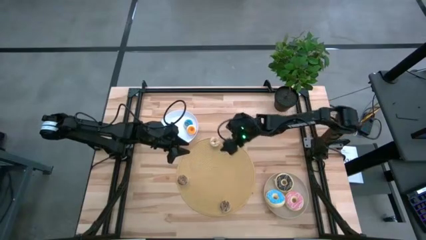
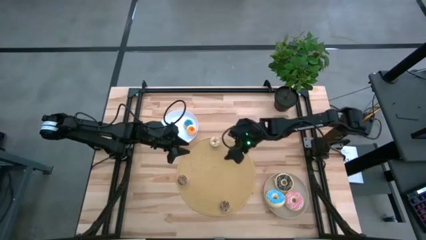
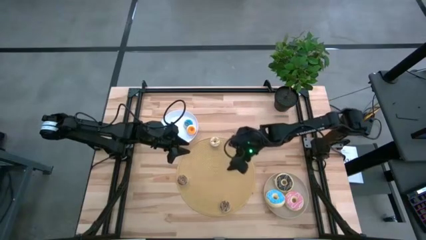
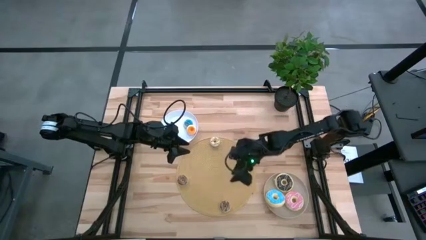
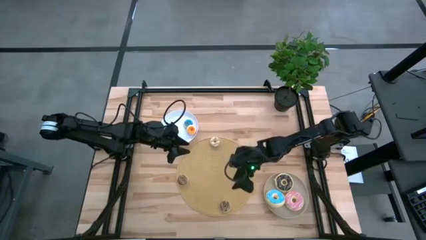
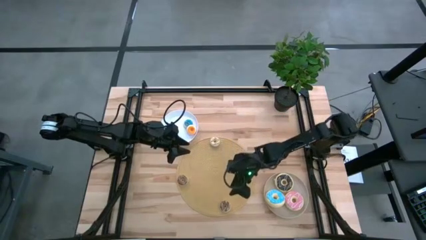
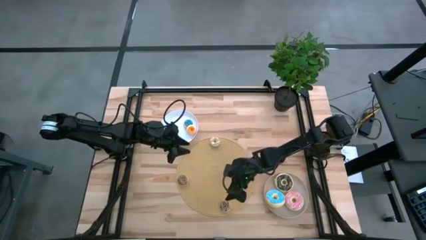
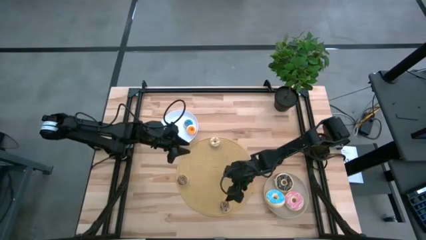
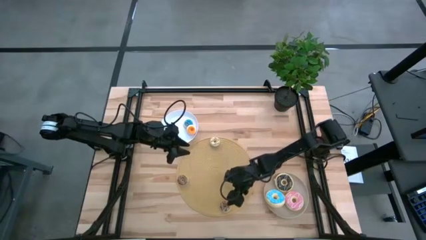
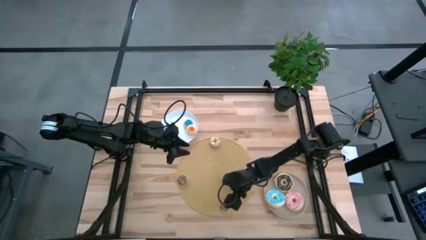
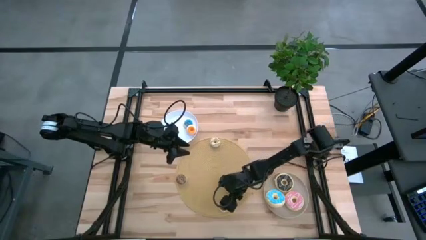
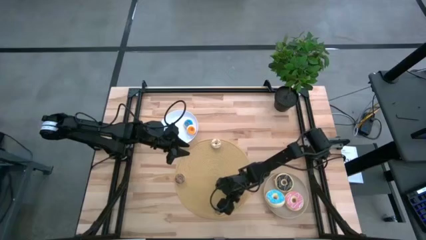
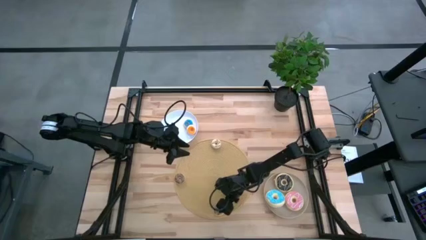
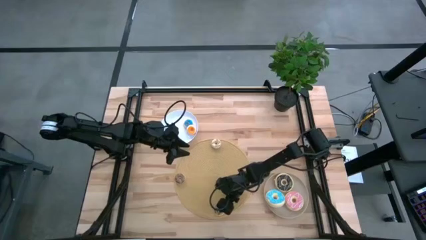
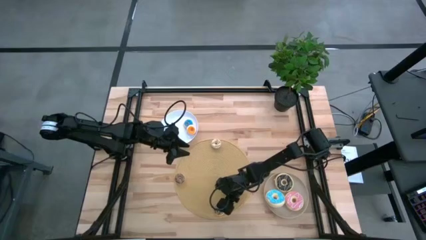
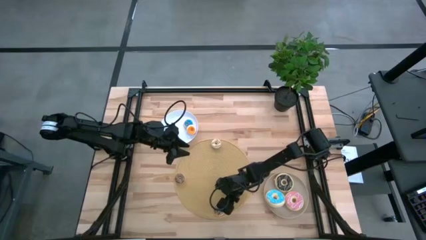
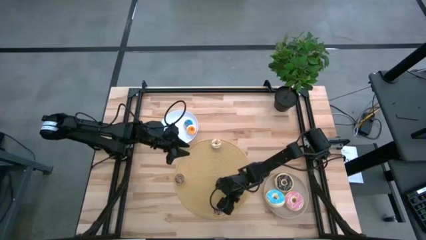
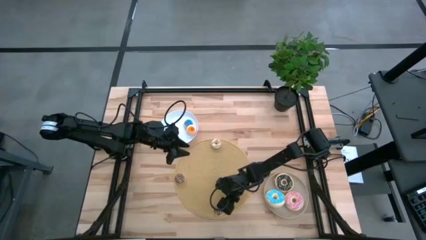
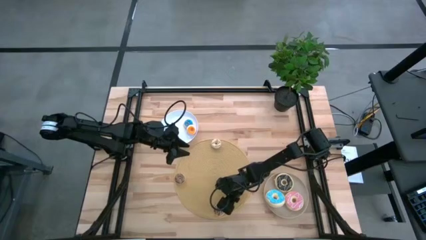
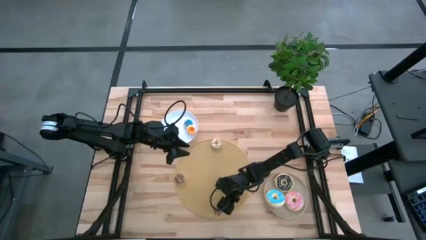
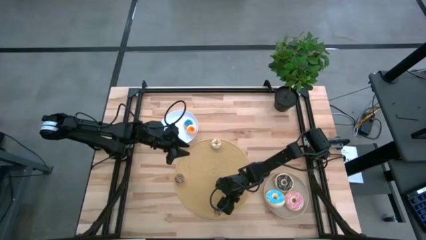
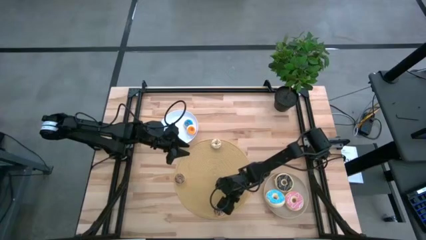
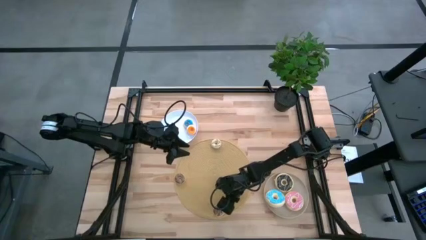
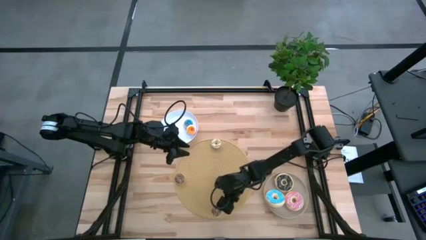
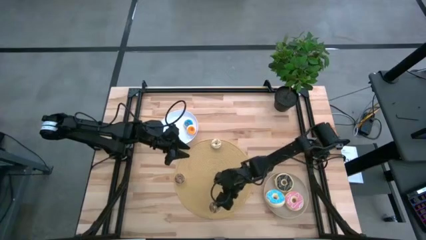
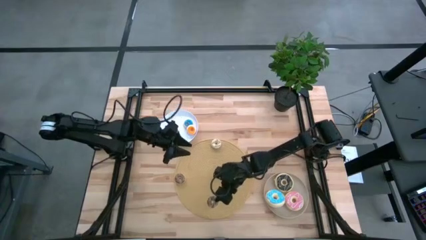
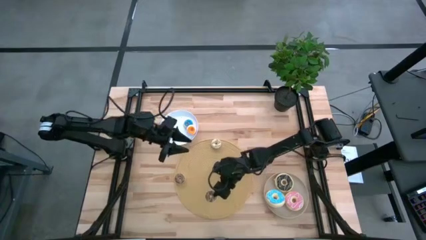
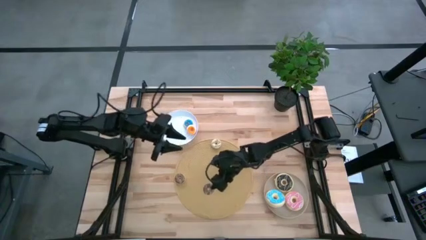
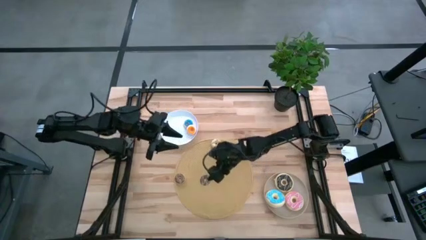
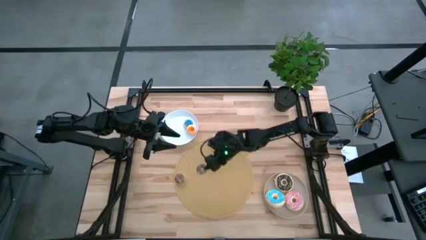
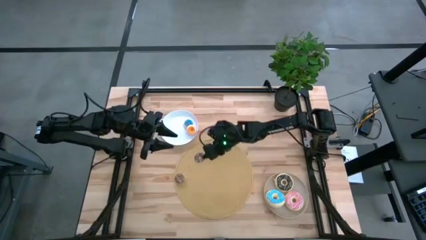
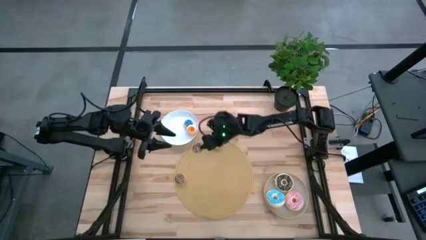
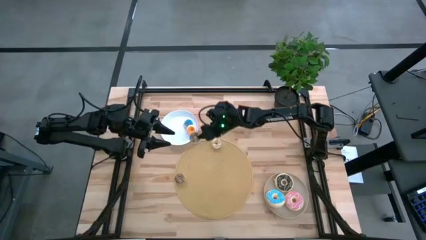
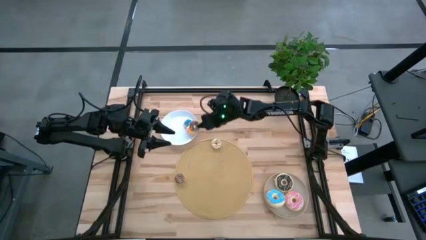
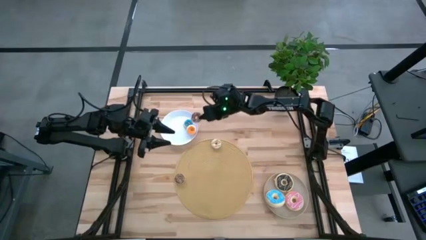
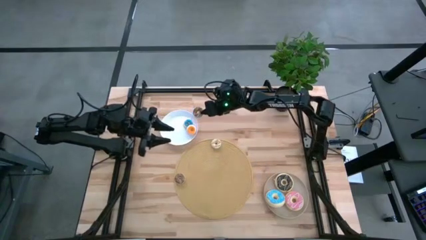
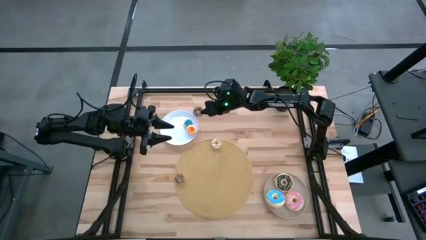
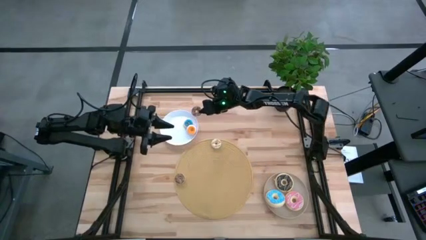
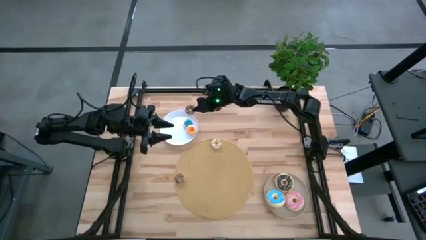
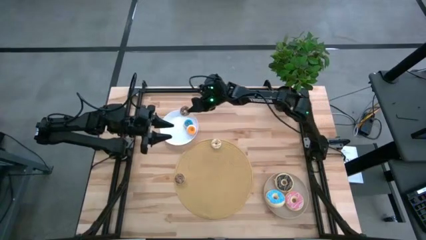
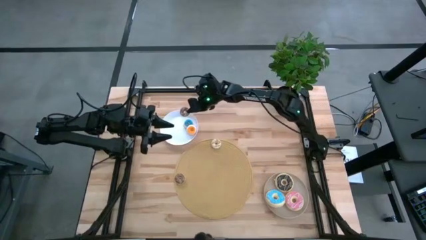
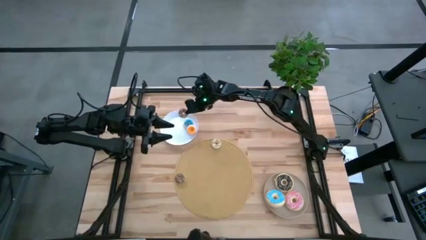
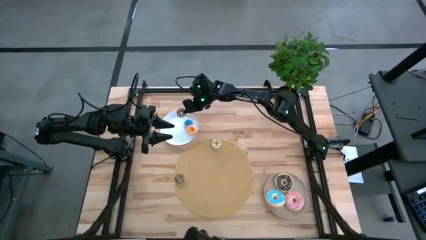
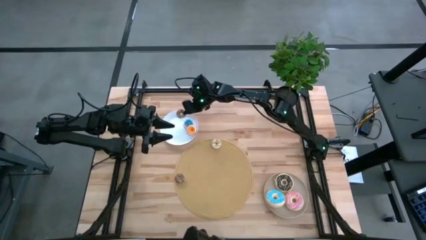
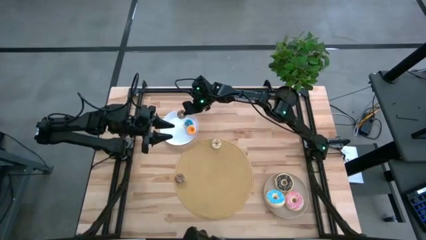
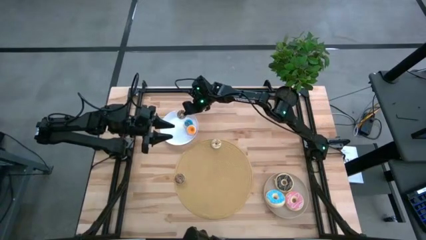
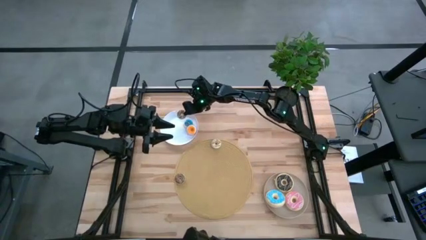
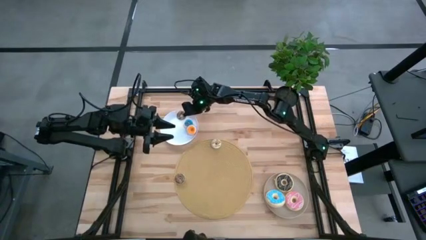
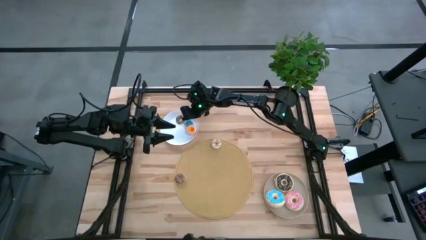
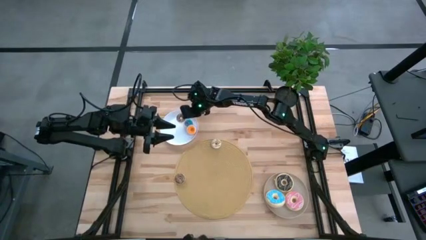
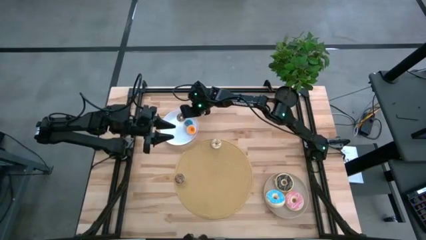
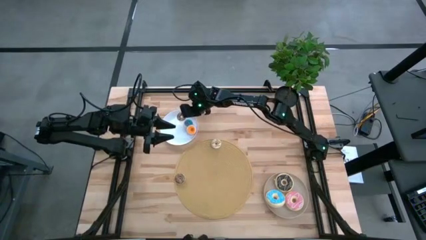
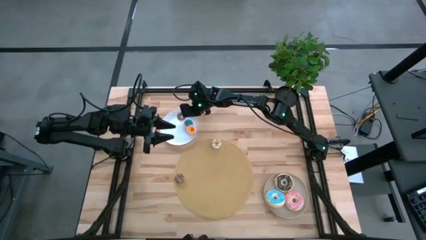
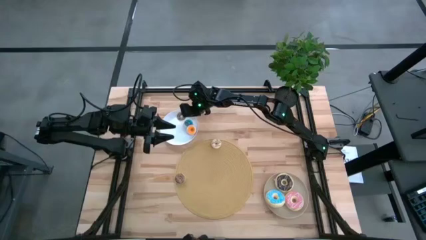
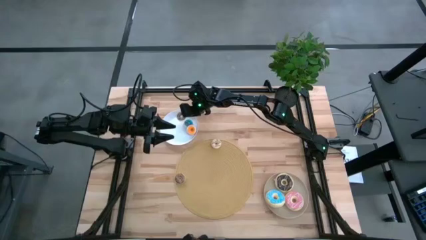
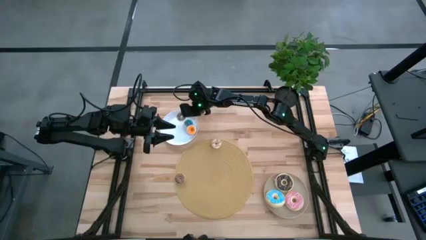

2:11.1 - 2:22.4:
Task: Pick & Place donuts
Put the small brown donut into the white plate
